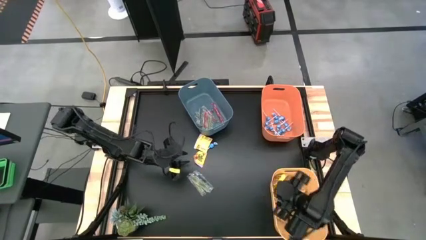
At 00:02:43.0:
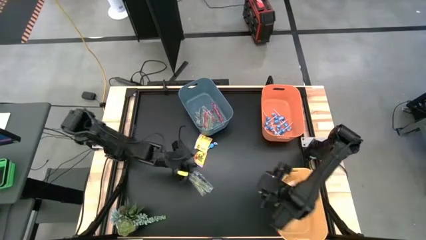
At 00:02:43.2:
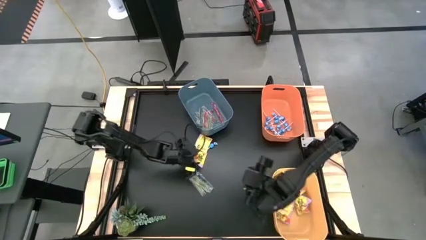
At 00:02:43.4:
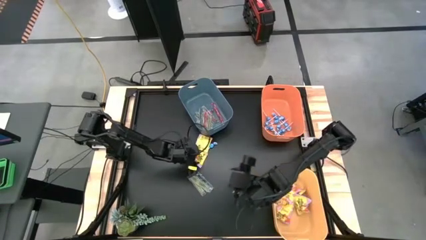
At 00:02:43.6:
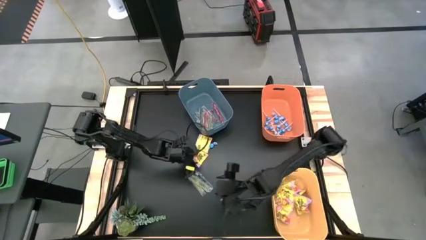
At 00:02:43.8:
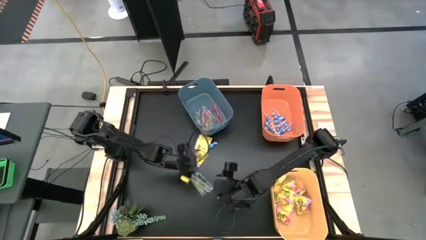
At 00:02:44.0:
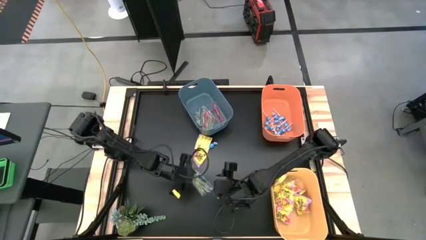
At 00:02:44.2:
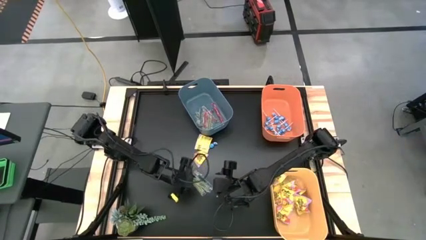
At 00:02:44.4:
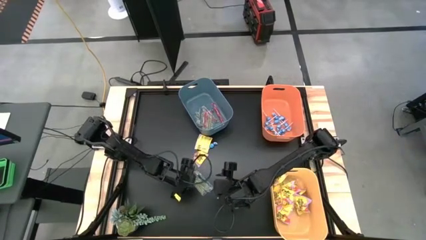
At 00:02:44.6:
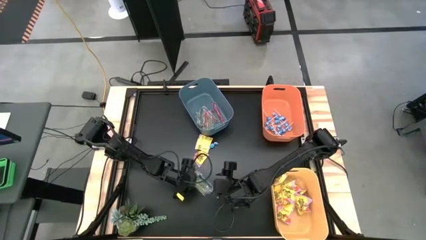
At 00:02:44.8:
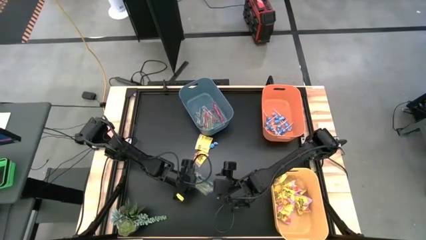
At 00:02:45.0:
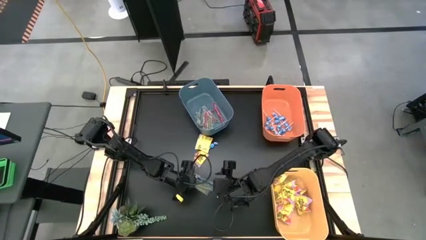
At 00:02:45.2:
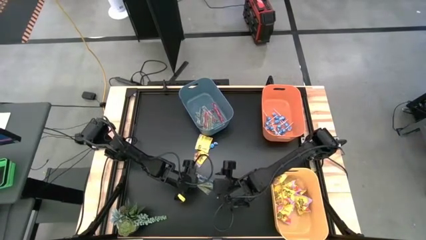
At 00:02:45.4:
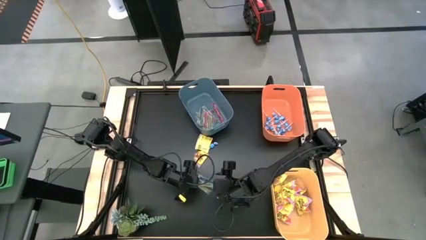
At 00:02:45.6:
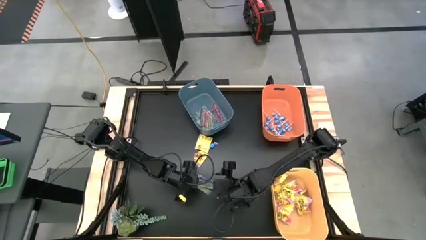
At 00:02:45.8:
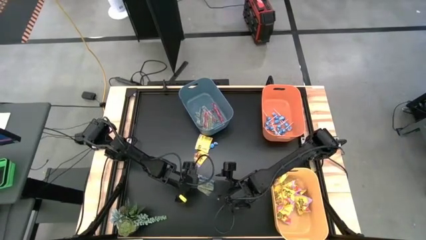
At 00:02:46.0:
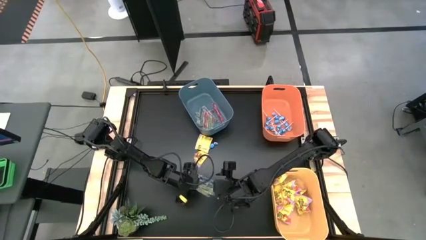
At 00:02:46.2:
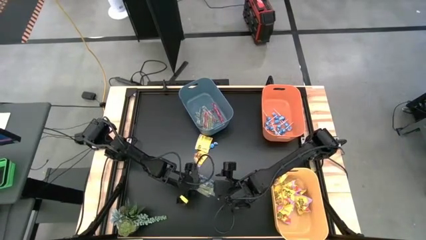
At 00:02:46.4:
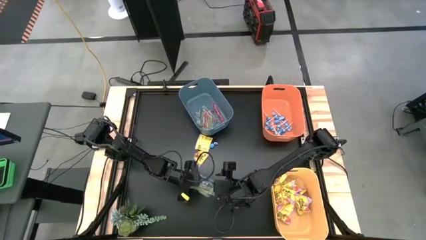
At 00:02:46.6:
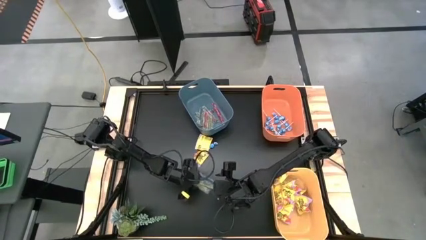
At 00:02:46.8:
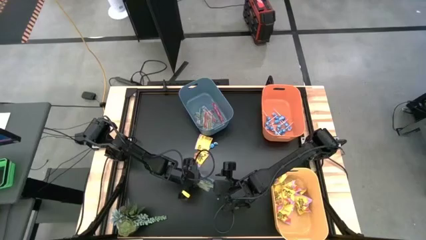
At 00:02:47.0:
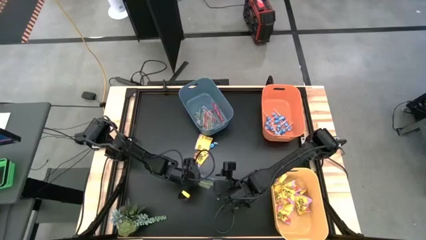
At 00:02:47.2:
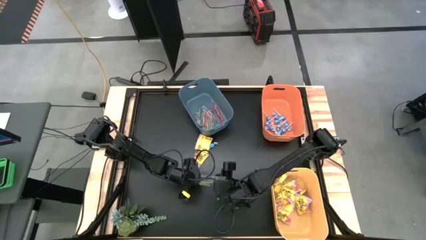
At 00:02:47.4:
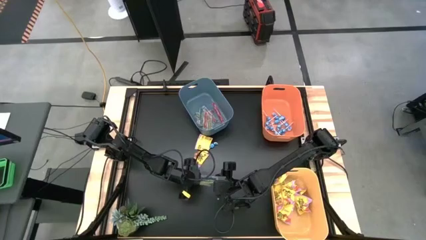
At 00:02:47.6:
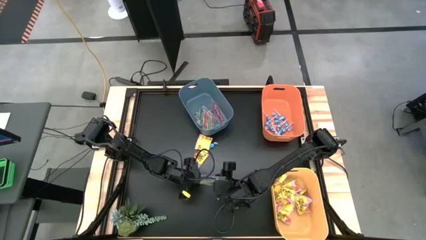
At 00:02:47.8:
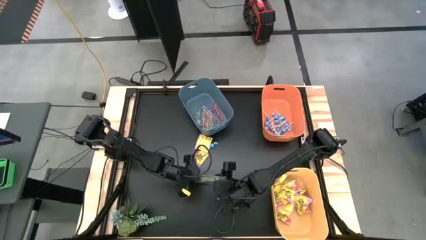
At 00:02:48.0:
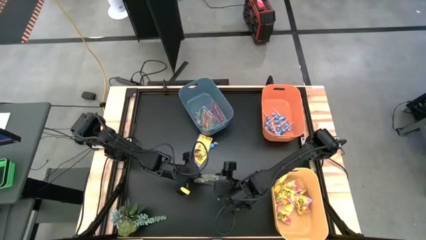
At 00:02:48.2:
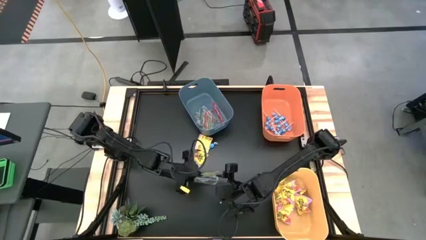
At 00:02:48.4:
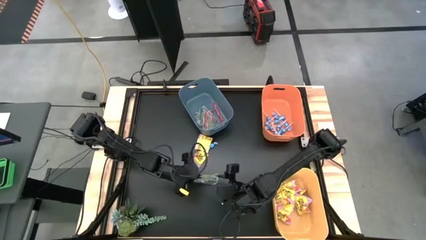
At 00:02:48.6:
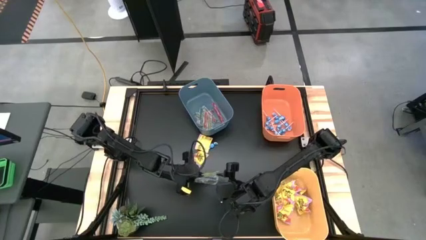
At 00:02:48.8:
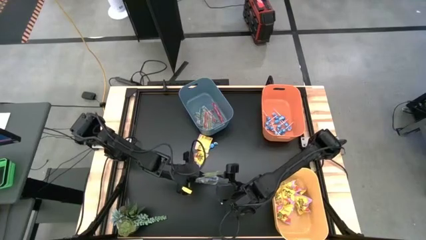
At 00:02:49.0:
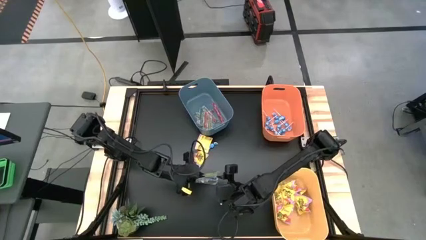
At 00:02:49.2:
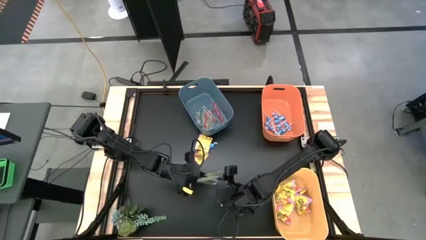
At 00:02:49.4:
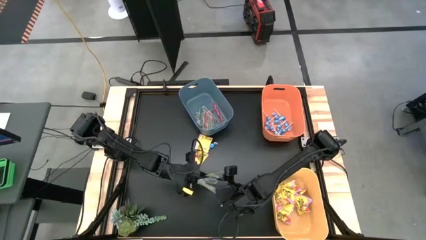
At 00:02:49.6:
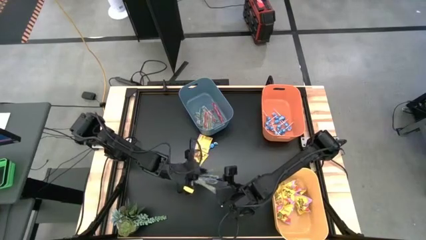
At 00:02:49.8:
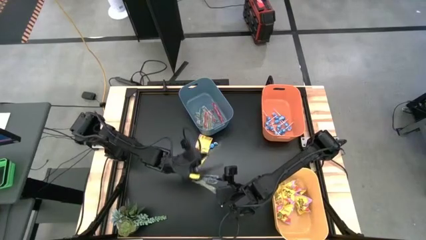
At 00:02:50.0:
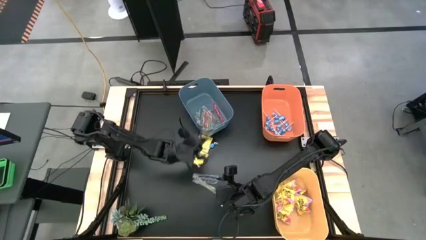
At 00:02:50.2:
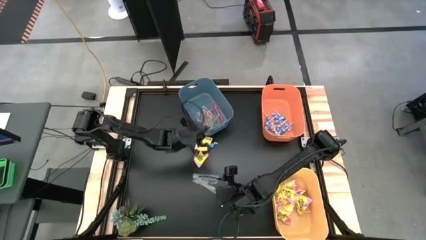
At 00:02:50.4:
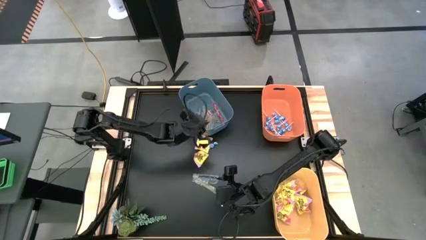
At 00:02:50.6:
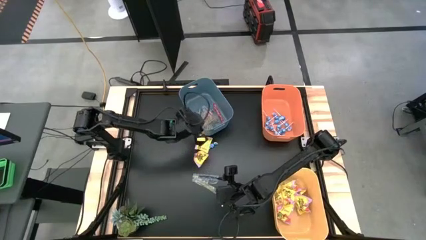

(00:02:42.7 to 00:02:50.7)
Task: Sort candy
Put the transparent candy into the blue bin

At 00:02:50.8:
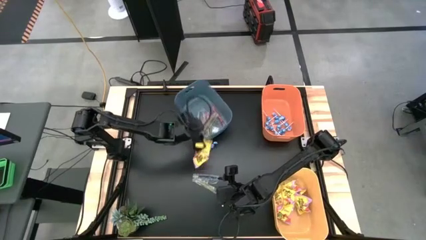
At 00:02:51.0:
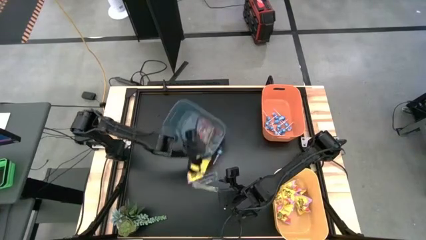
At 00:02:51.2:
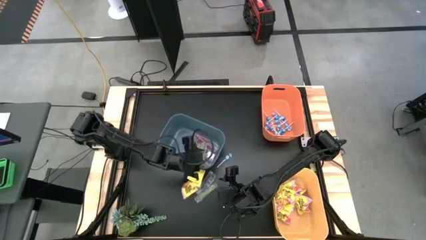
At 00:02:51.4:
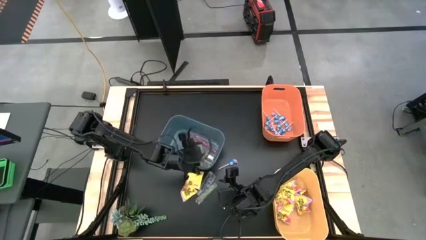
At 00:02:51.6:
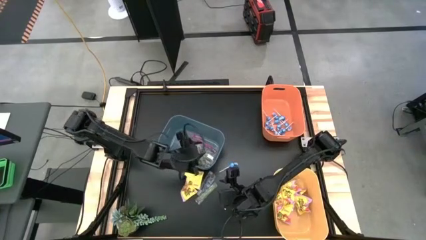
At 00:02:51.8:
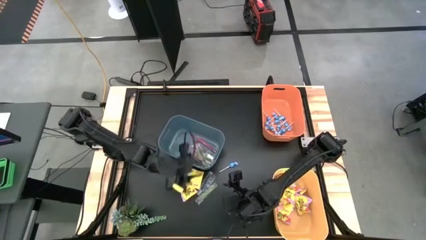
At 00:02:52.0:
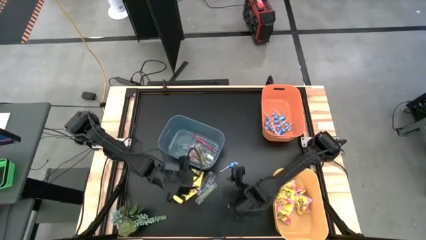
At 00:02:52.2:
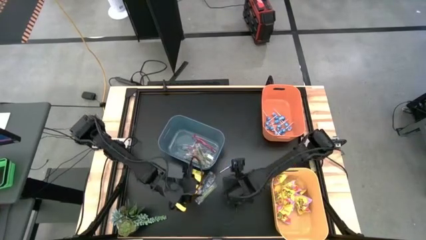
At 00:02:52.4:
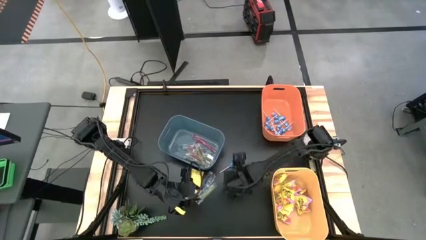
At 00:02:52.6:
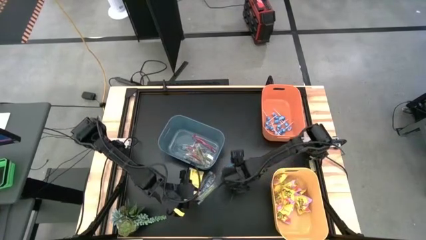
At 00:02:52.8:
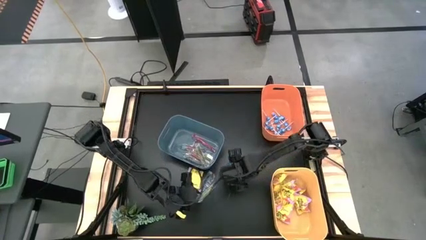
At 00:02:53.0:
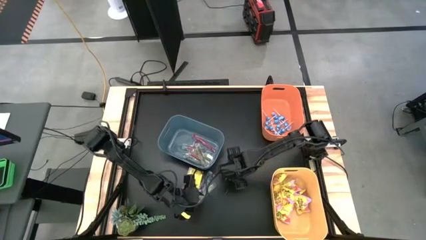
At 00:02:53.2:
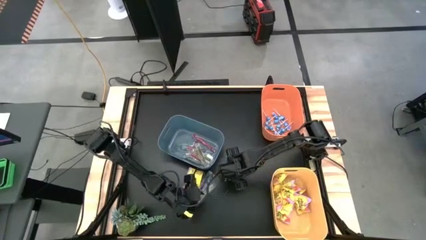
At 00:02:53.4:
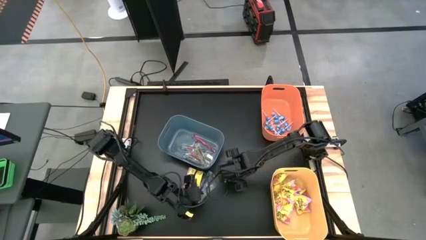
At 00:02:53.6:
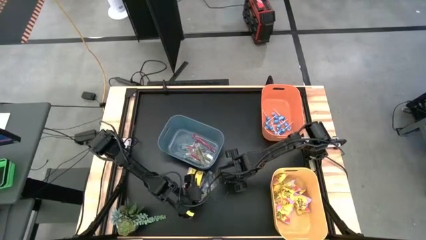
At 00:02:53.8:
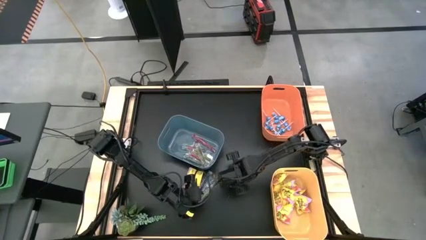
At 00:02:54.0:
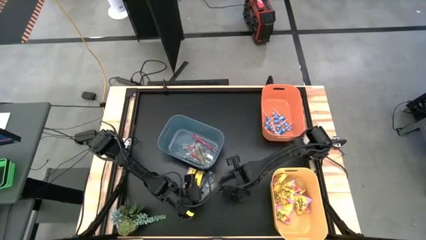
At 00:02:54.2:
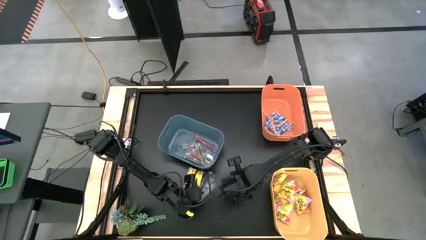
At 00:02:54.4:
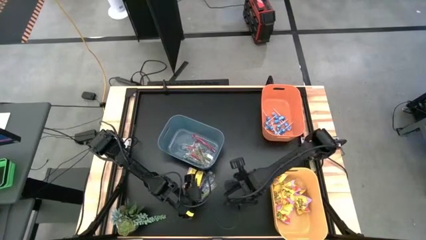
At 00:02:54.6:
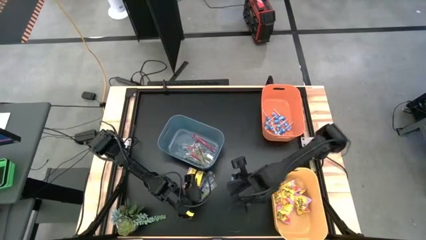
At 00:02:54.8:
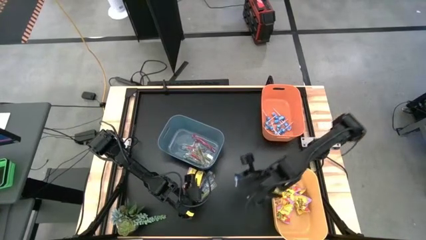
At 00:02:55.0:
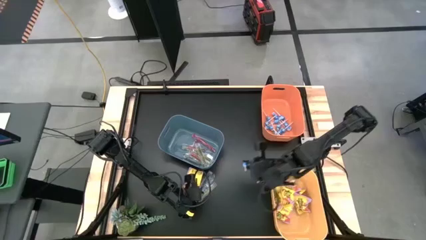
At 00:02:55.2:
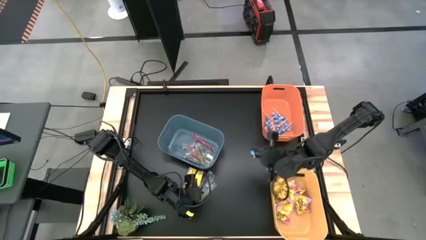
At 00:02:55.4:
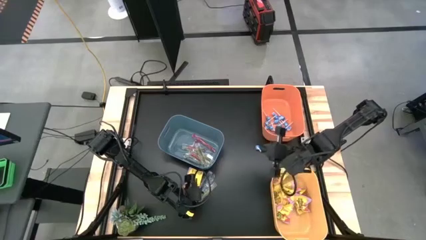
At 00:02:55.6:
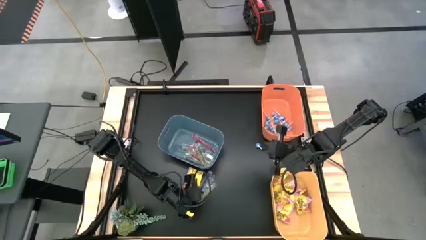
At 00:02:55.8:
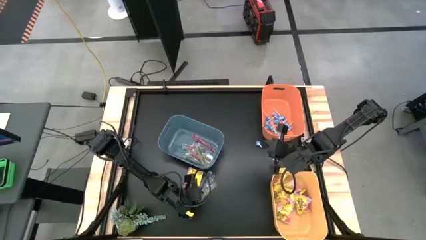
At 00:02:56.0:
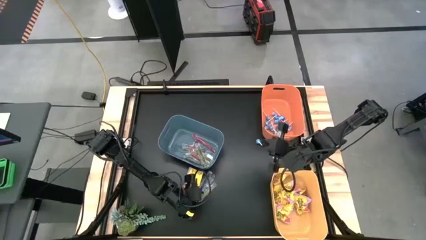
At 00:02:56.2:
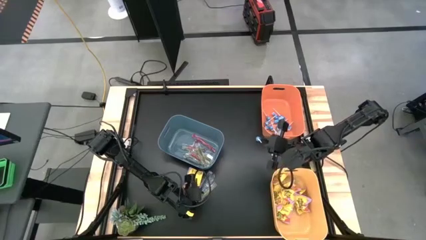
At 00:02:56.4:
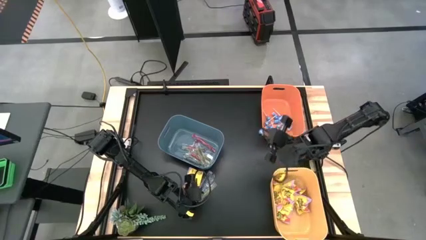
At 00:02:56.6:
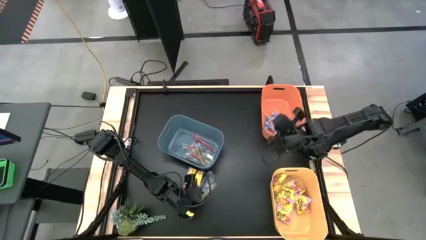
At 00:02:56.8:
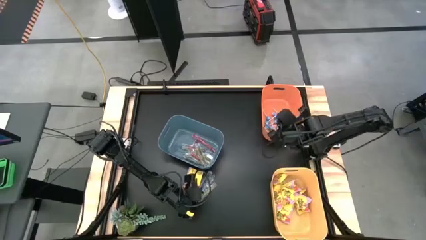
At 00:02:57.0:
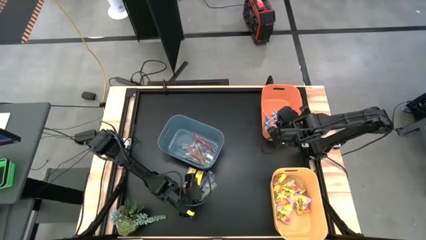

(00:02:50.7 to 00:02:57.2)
Put the blue candy into the orange bin

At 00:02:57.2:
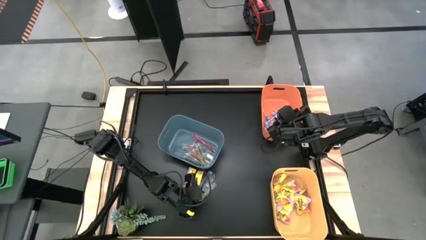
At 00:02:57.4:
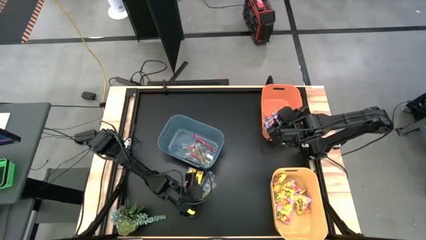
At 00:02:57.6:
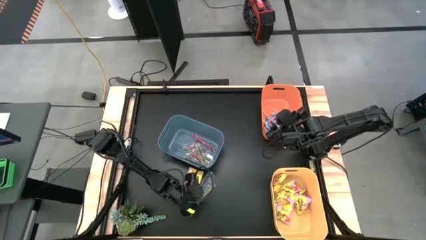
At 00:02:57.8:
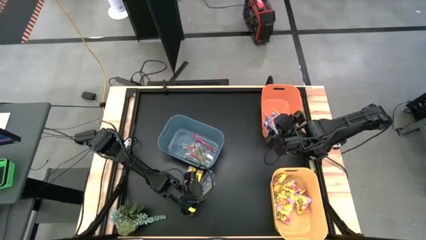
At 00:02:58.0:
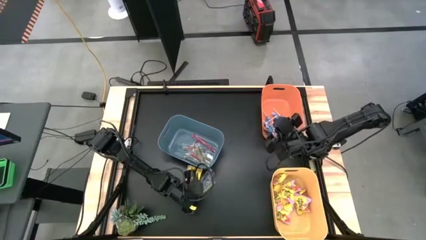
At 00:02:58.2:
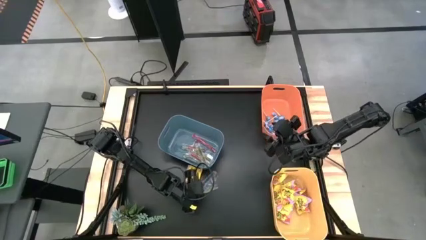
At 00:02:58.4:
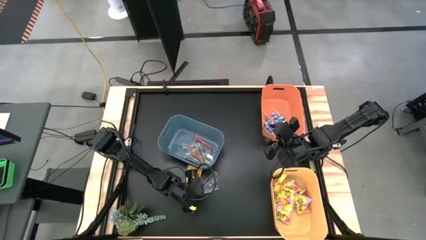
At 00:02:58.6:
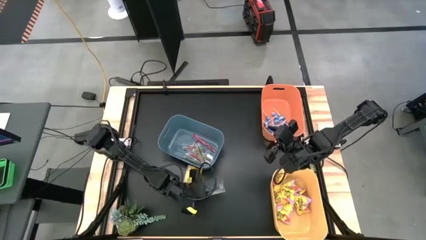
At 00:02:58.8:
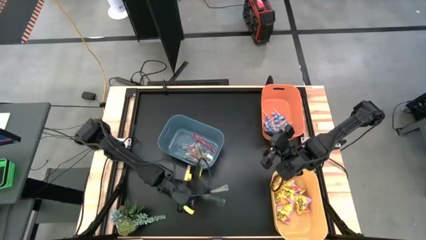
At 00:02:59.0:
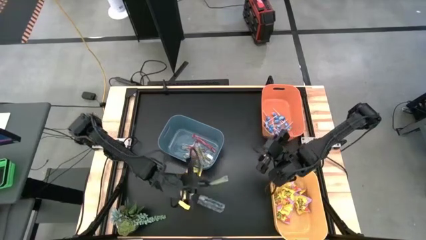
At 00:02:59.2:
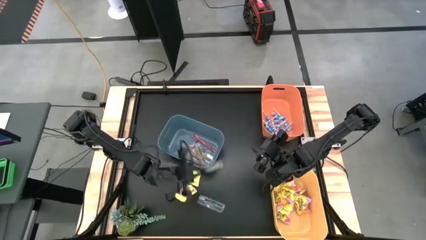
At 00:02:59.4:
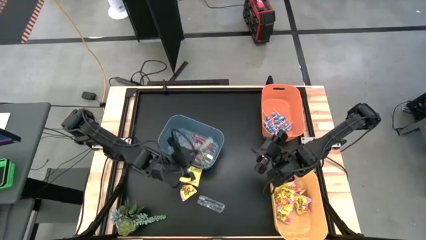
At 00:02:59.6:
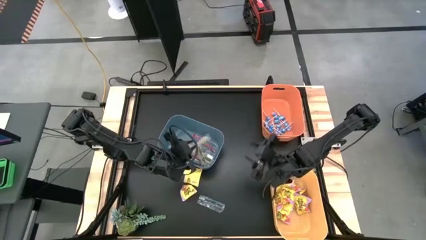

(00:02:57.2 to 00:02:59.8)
Put the transparent candy into the blue bin
